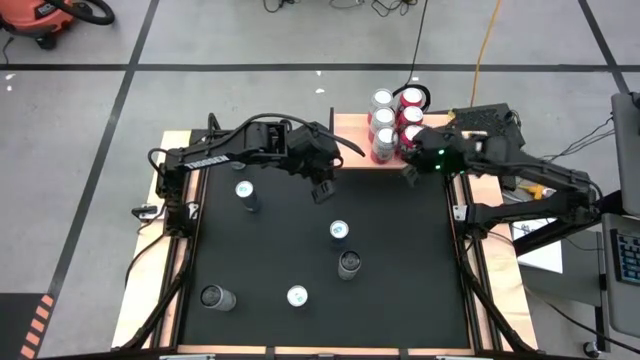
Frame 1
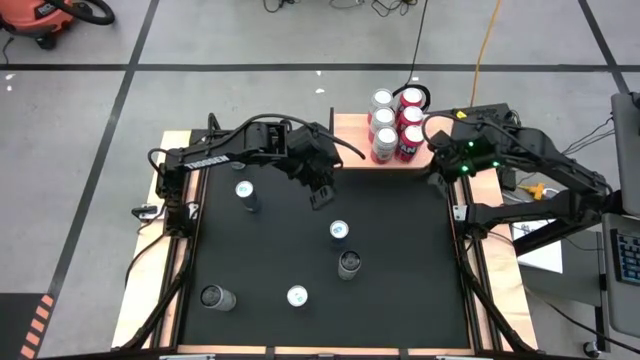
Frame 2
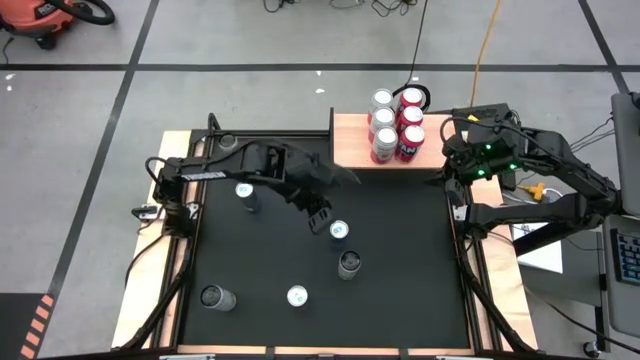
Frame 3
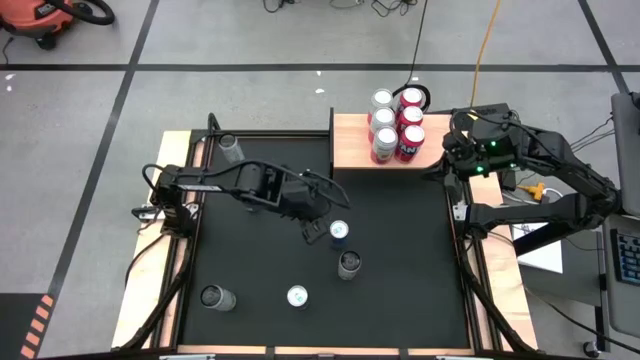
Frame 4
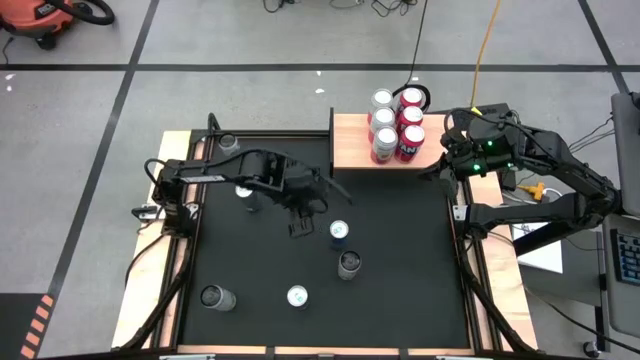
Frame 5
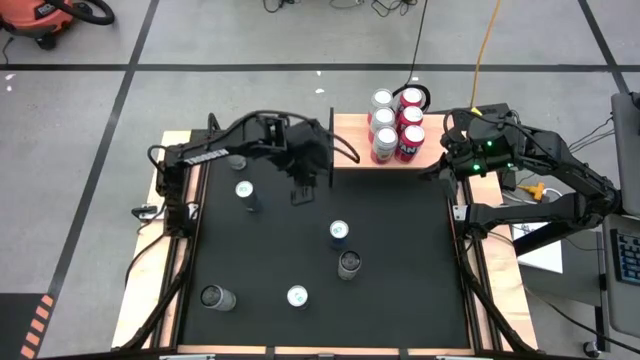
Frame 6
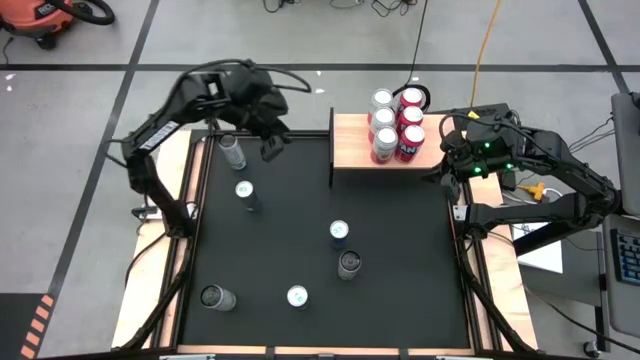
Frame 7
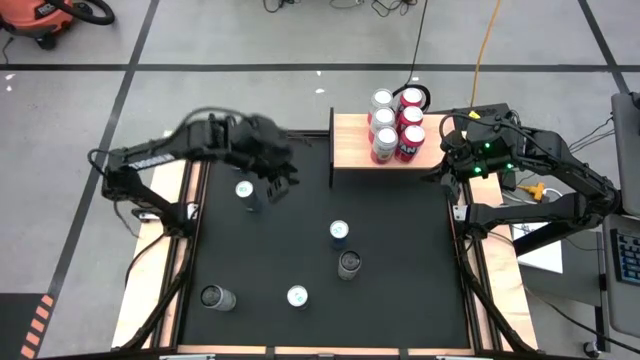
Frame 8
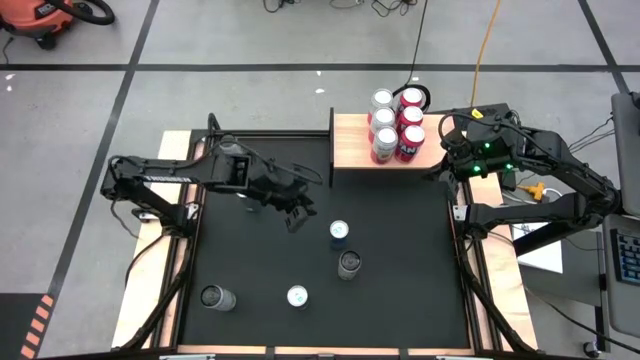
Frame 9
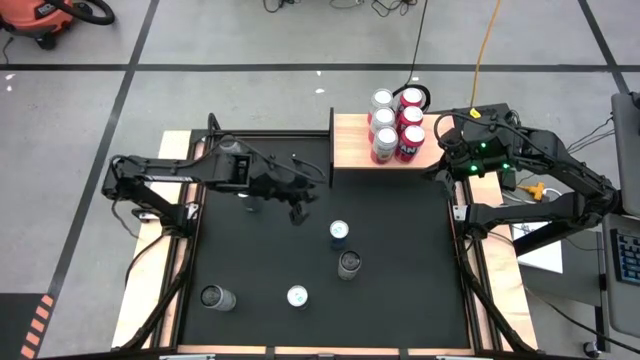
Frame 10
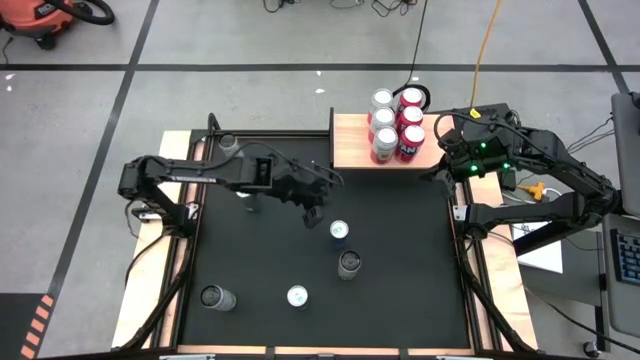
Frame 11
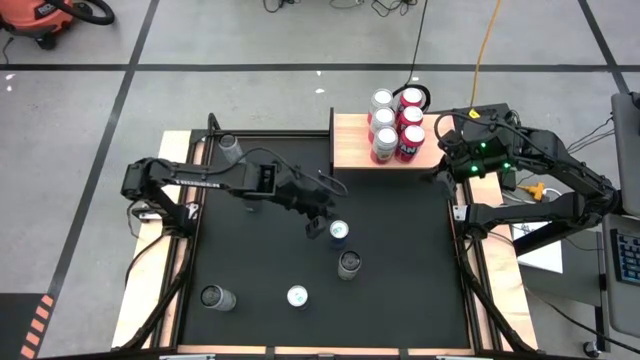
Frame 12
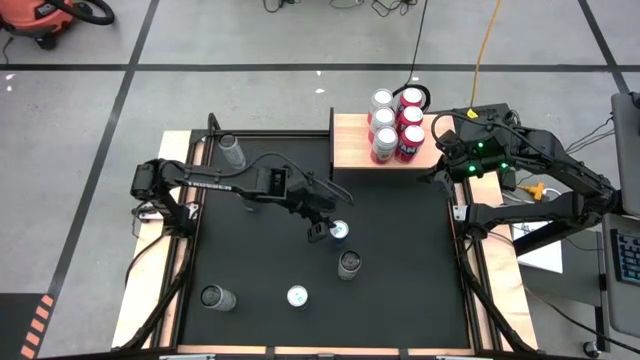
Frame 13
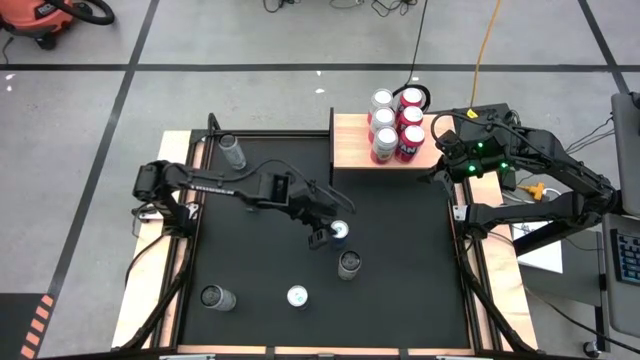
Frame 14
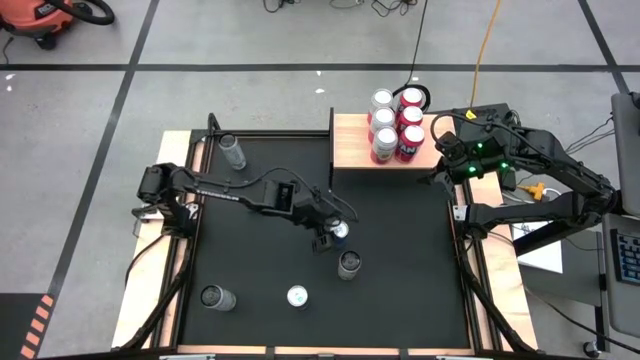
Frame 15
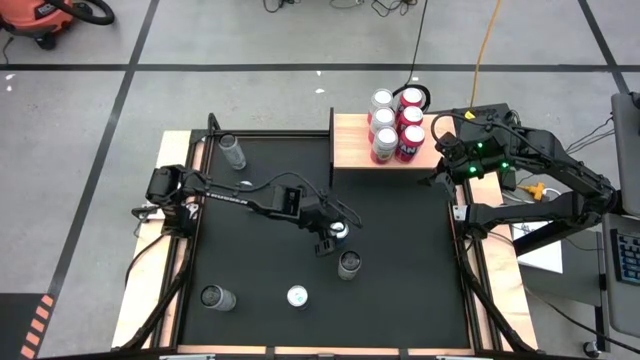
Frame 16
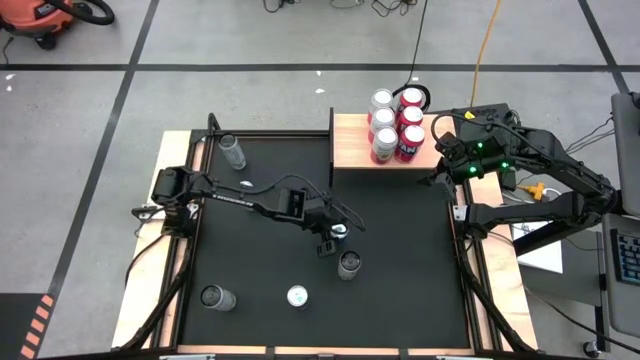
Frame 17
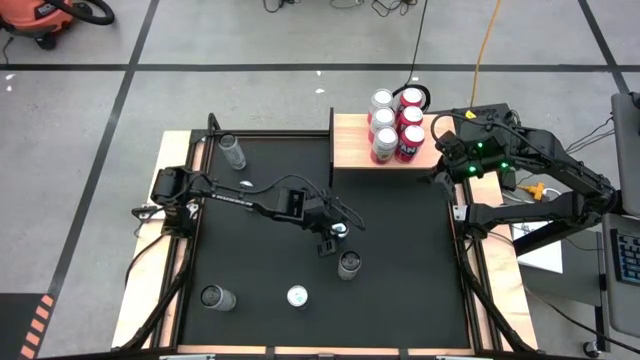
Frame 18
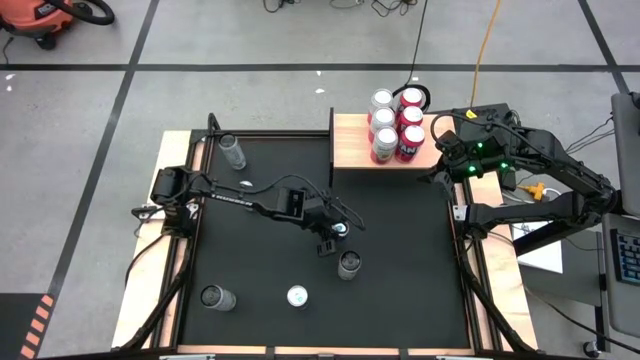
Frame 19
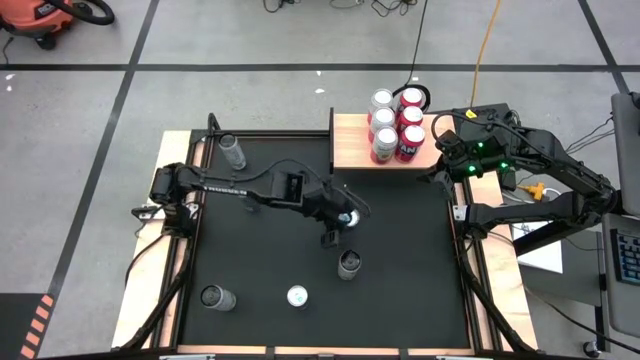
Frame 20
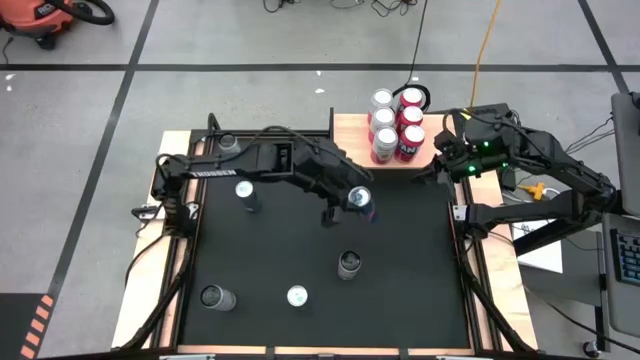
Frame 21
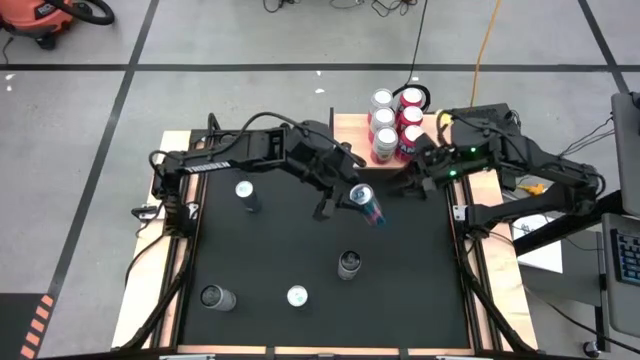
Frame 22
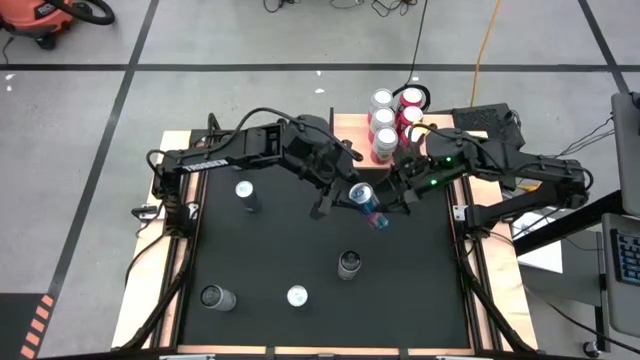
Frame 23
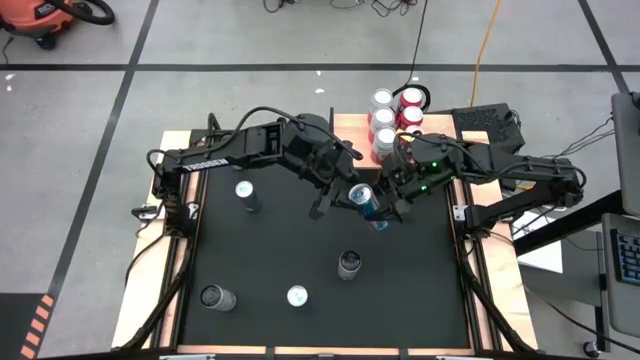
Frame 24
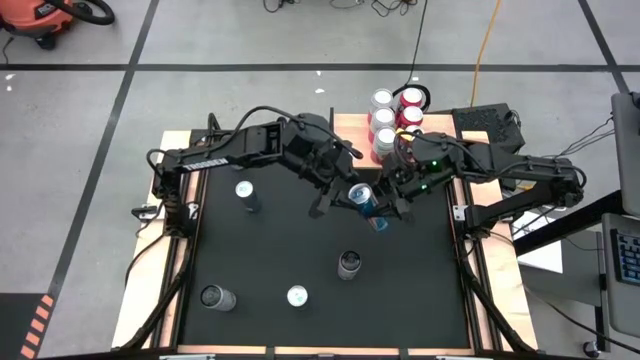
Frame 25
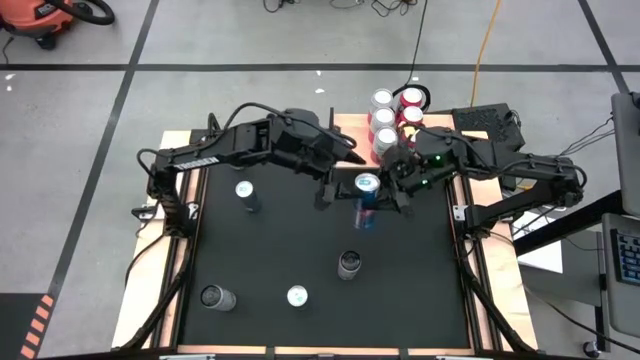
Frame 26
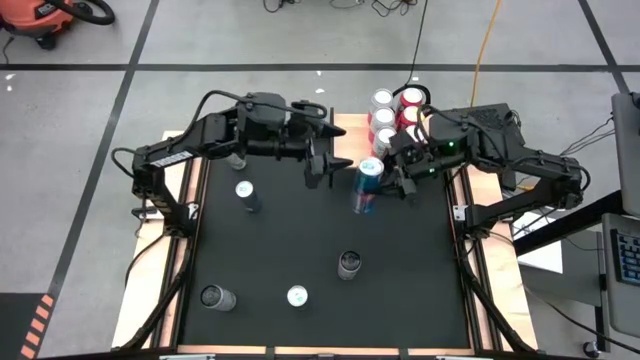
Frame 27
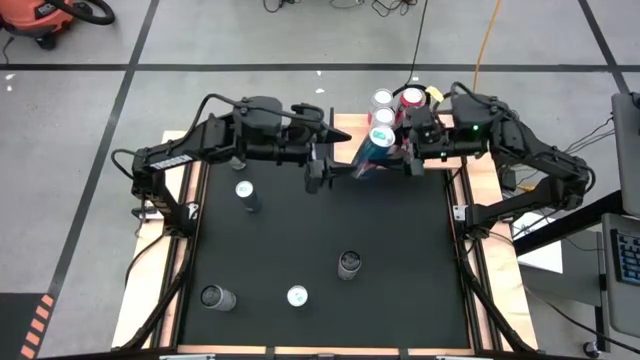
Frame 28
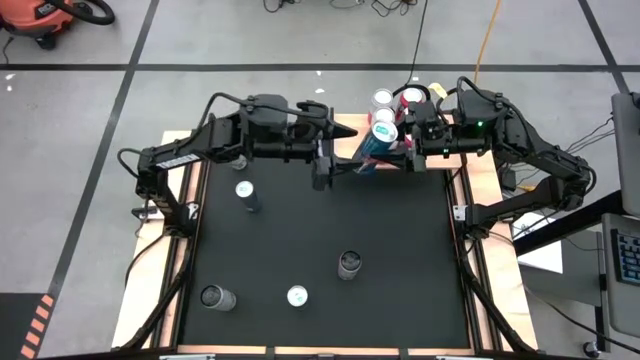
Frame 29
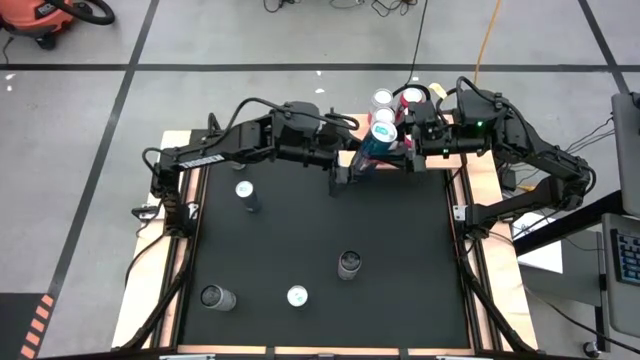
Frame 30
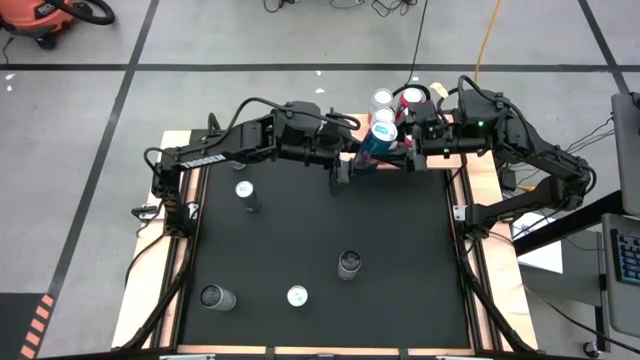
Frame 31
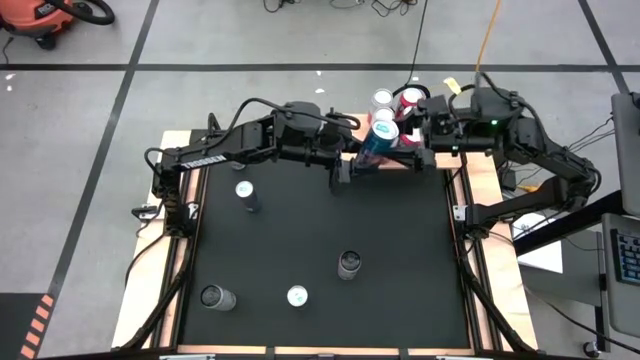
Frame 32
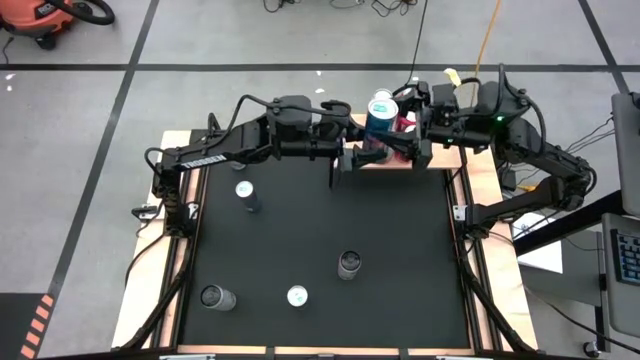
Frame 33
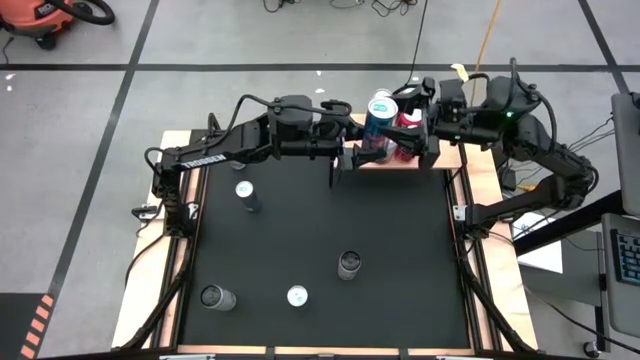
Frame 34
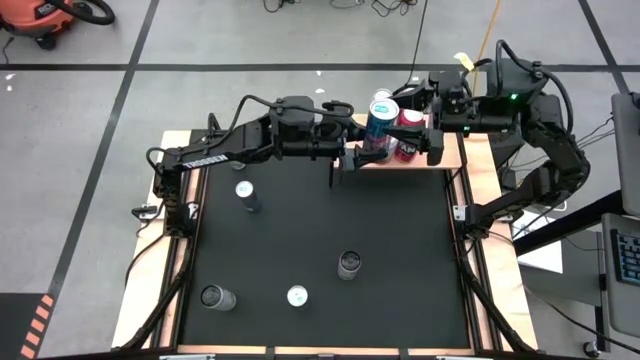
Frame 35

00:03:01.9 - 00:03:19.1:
Task: Place canned beverage on shelf
Put the middle blue soda can on the shelf

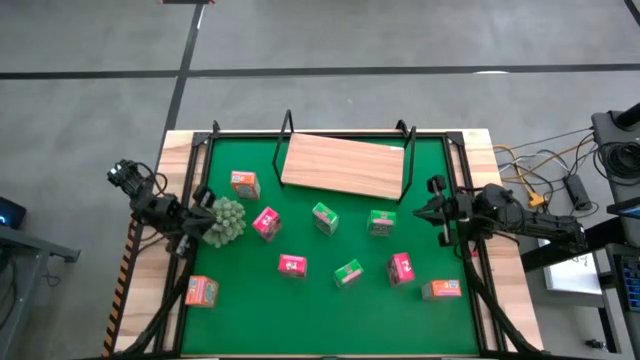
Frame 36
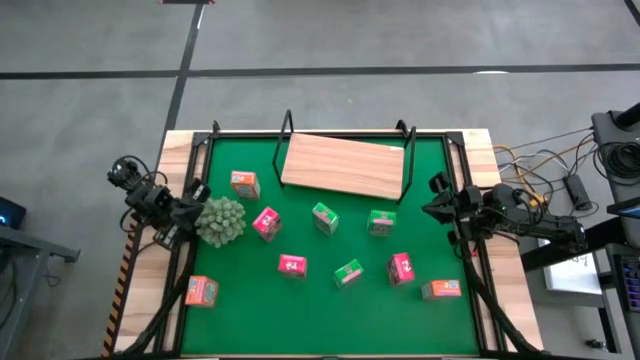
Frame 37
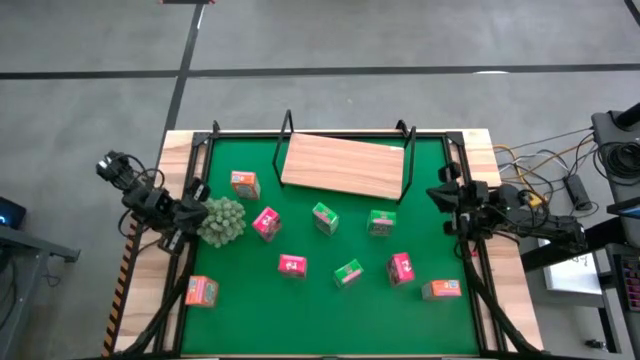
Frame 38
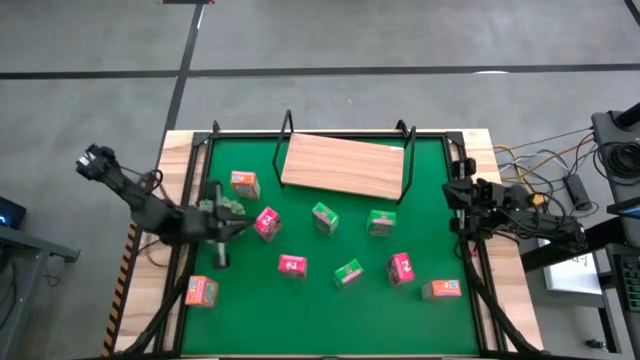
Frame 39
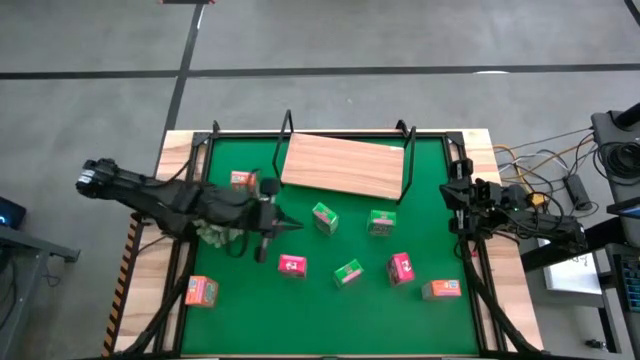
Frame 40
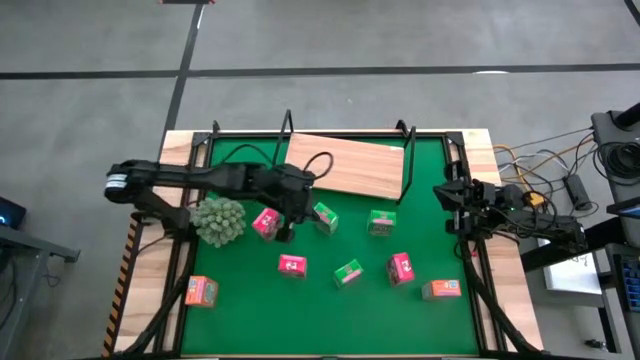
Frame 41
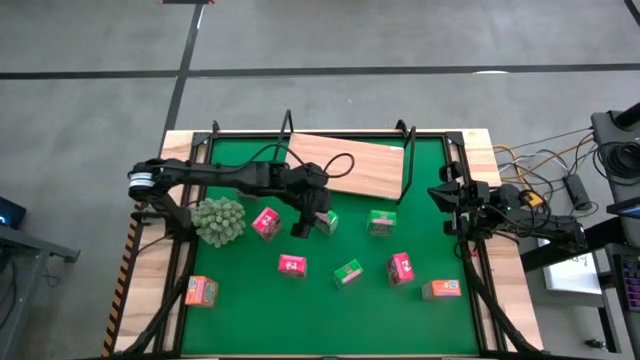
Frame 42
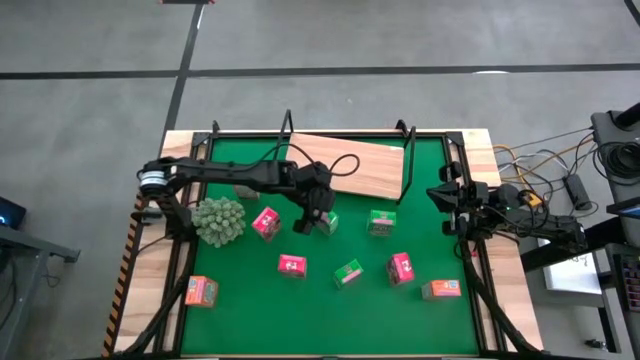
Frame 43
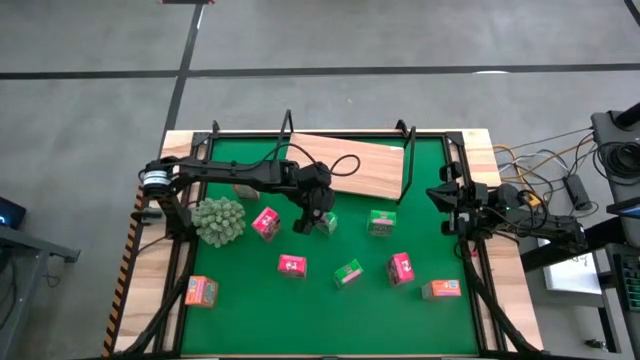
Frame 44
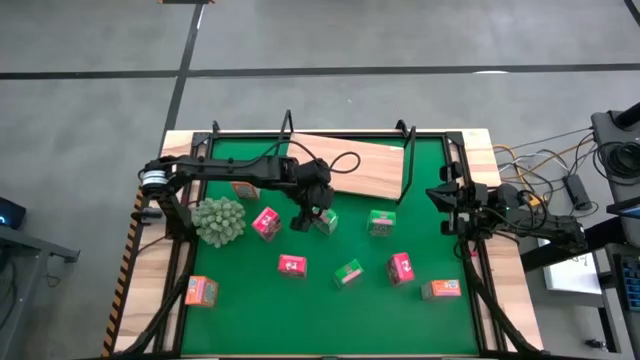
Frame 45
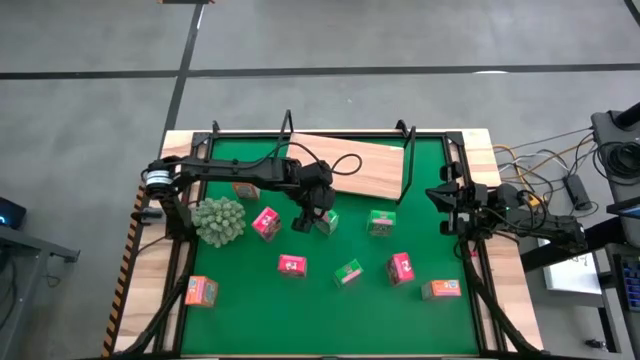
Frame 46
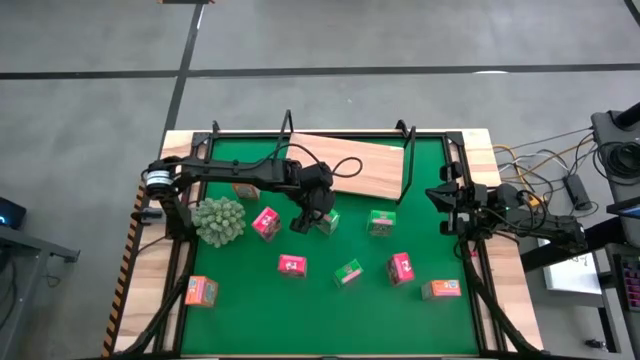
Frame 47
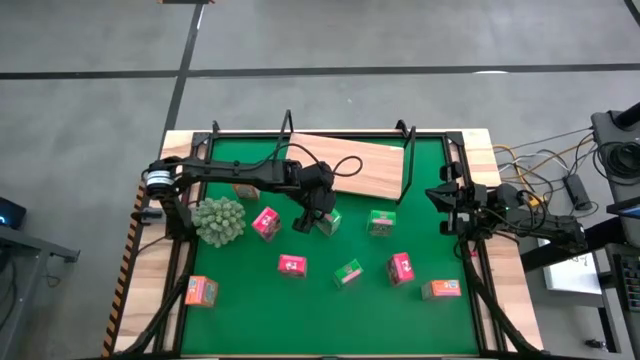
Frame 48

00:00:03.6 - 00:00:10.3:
Task: Stack cereal on shelf
Put the top left green cereal box on the shelf
